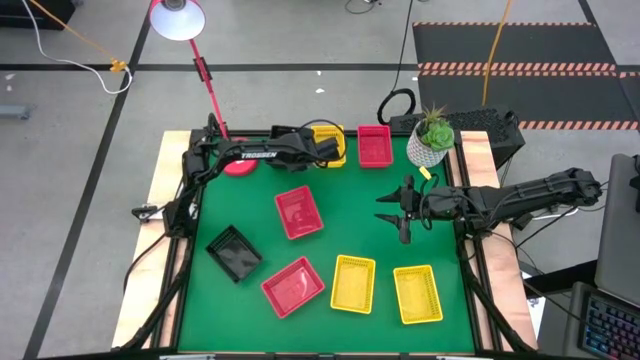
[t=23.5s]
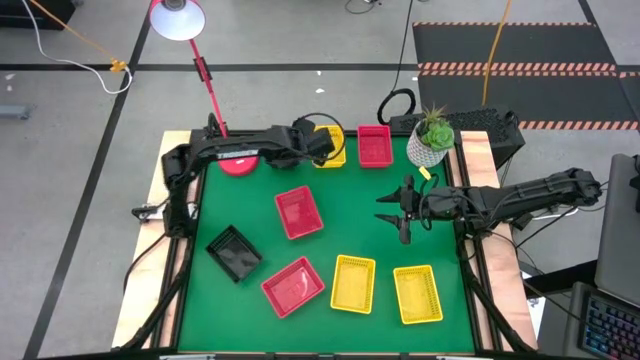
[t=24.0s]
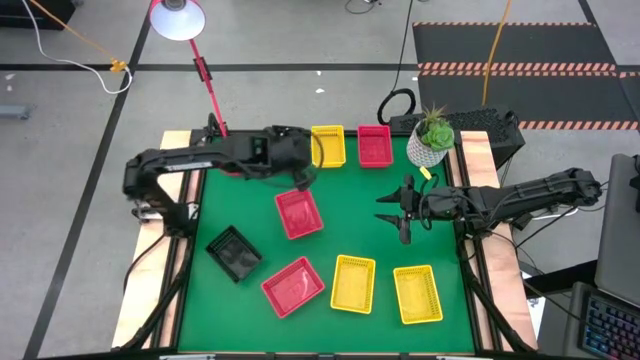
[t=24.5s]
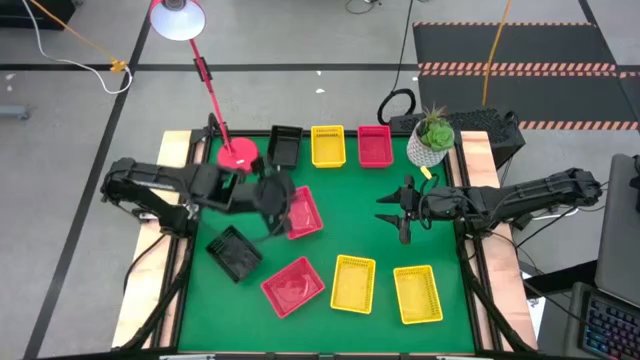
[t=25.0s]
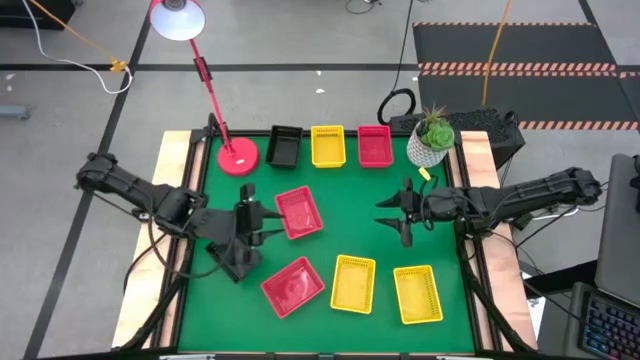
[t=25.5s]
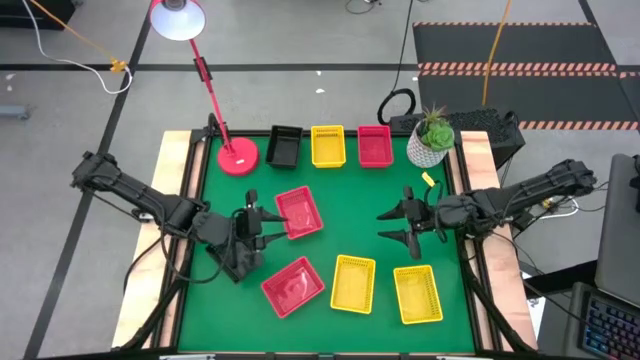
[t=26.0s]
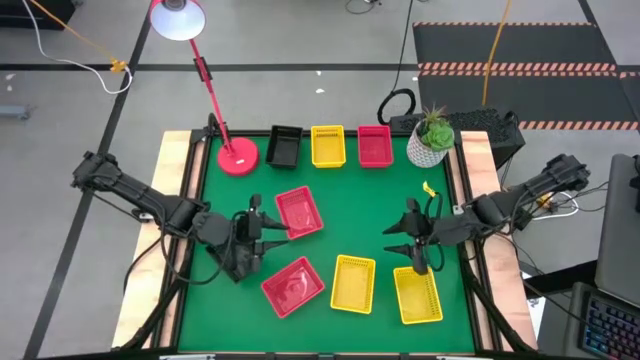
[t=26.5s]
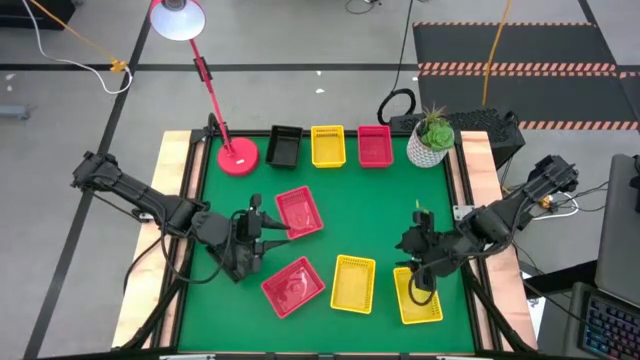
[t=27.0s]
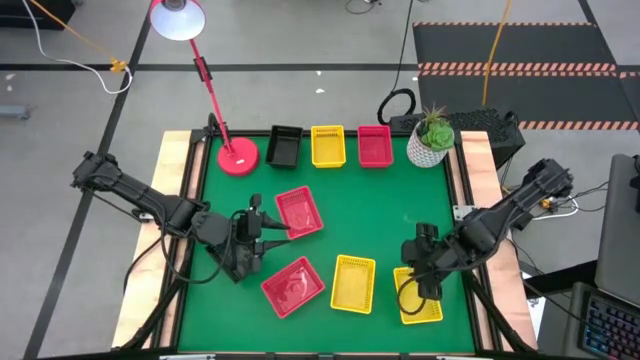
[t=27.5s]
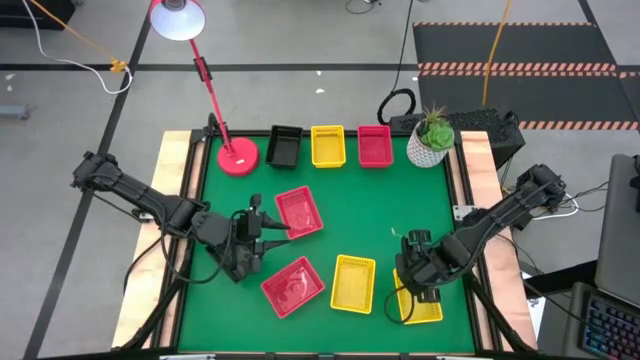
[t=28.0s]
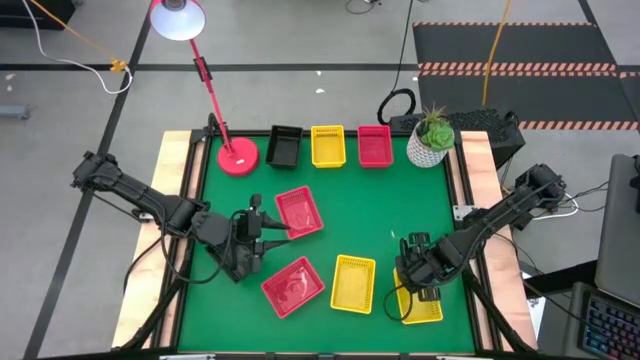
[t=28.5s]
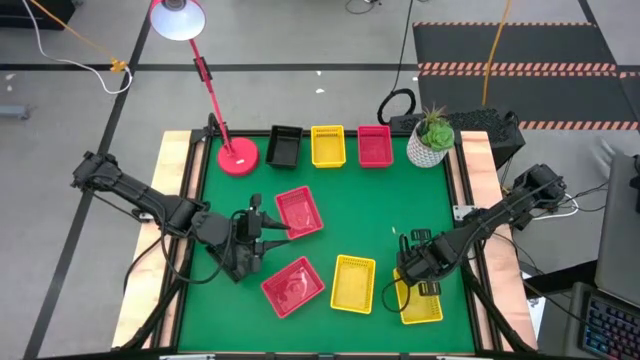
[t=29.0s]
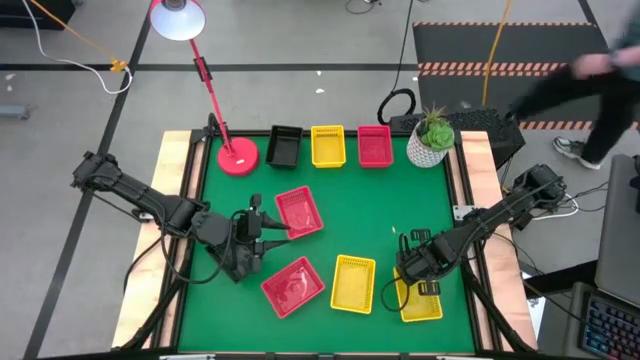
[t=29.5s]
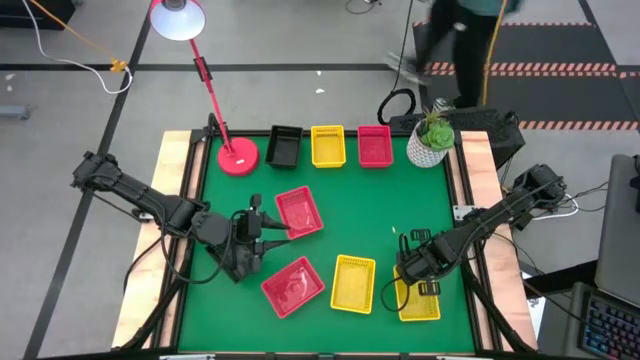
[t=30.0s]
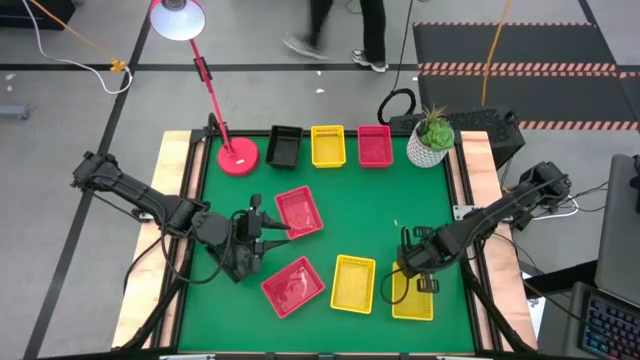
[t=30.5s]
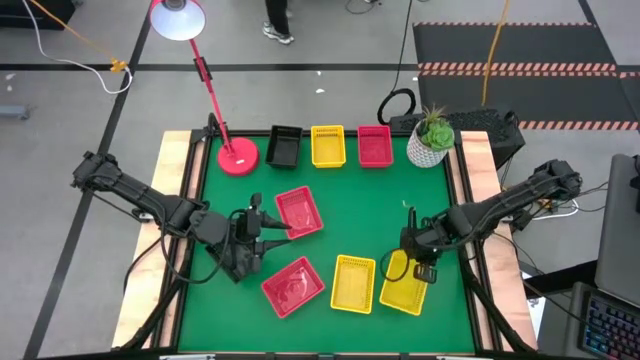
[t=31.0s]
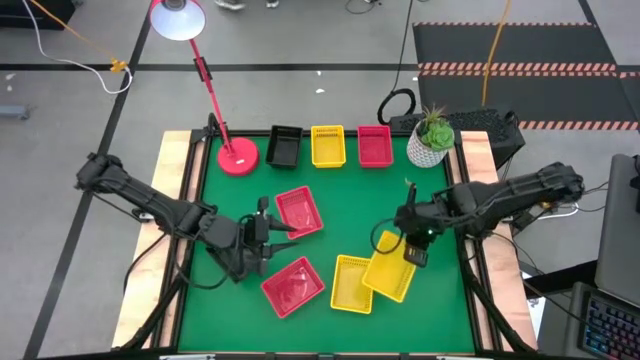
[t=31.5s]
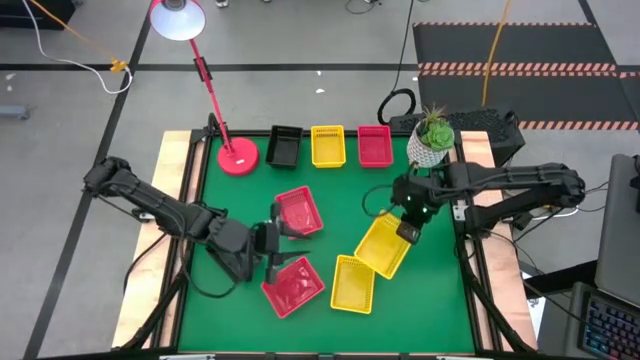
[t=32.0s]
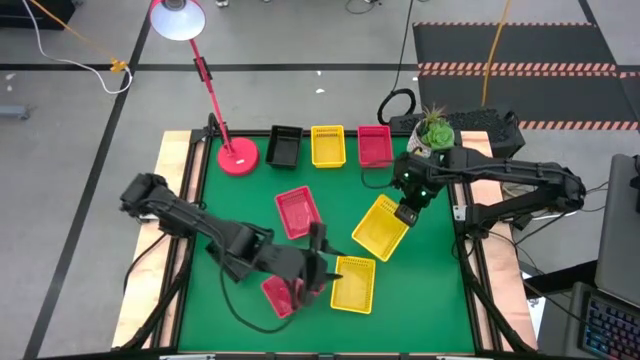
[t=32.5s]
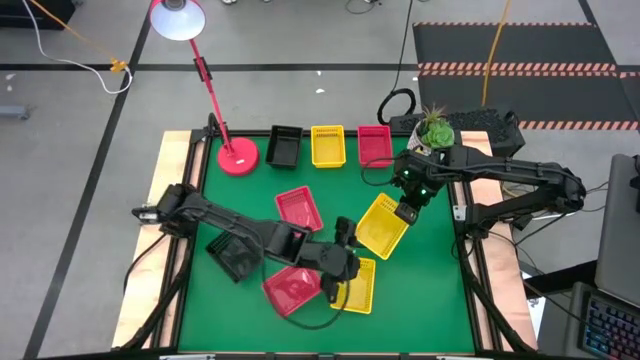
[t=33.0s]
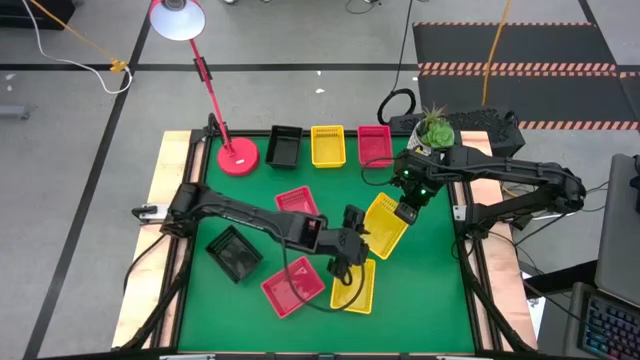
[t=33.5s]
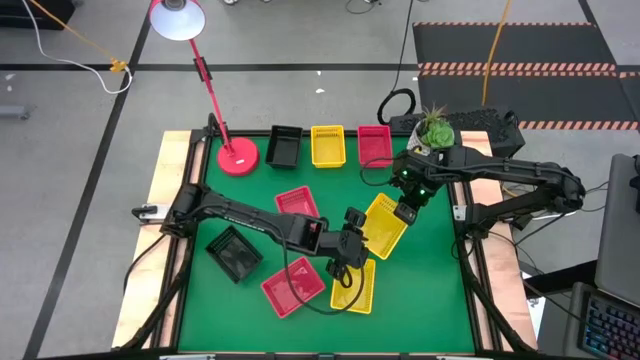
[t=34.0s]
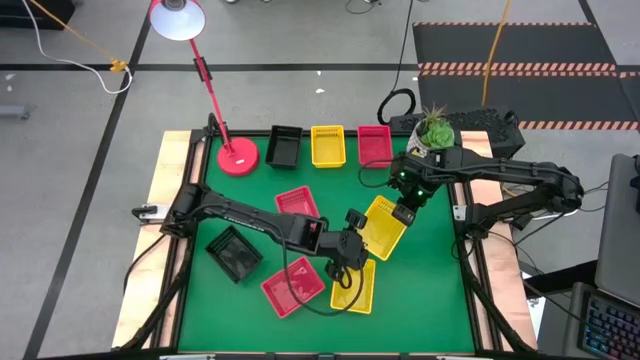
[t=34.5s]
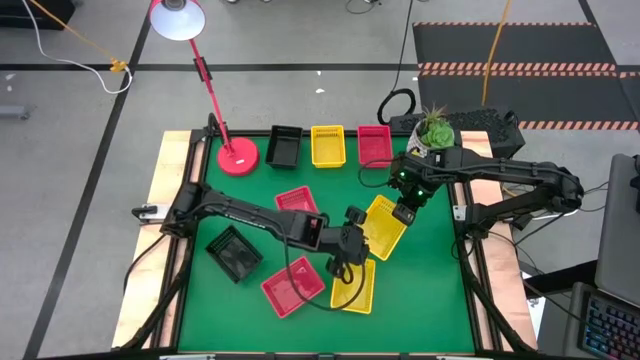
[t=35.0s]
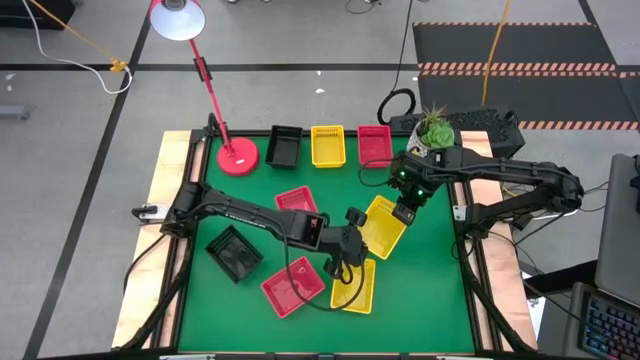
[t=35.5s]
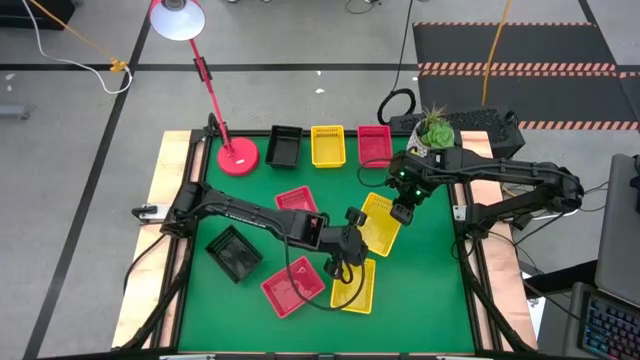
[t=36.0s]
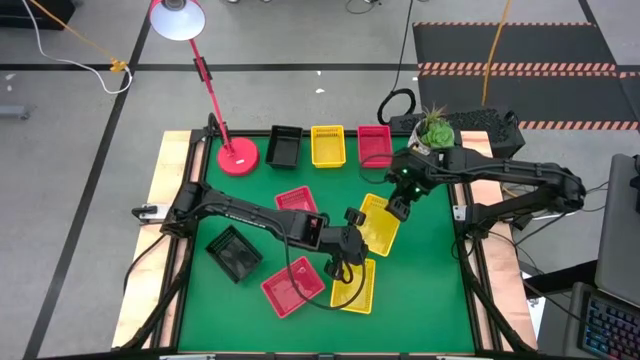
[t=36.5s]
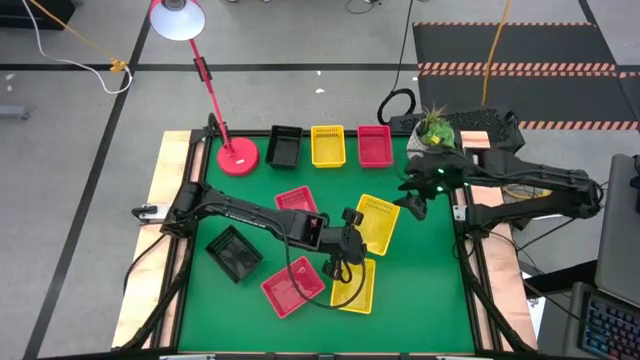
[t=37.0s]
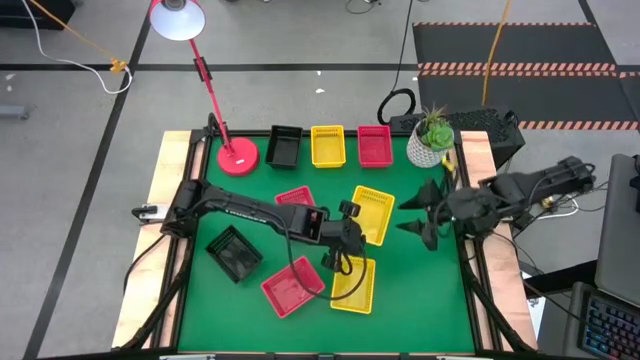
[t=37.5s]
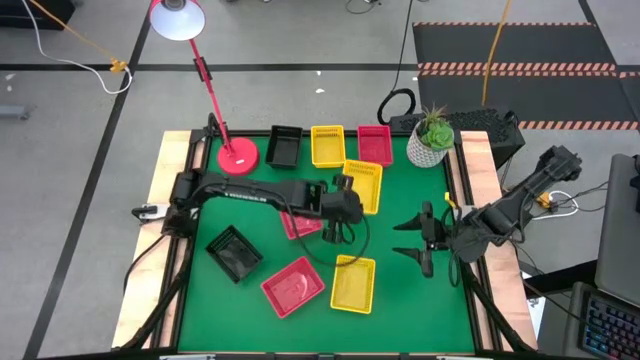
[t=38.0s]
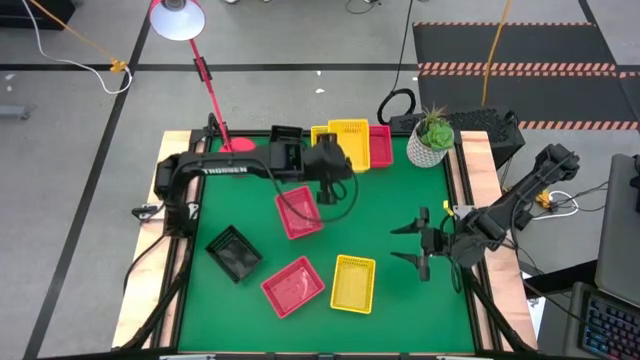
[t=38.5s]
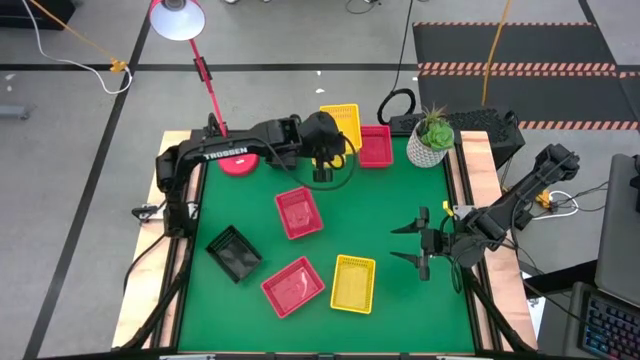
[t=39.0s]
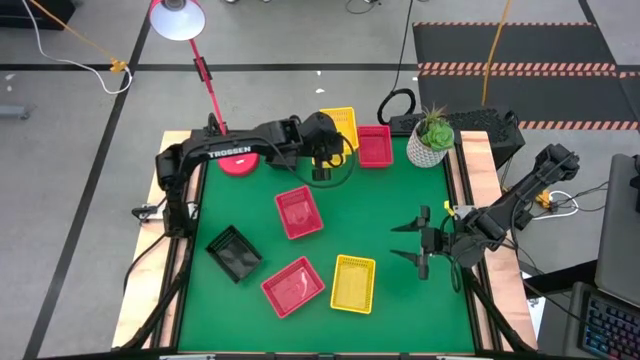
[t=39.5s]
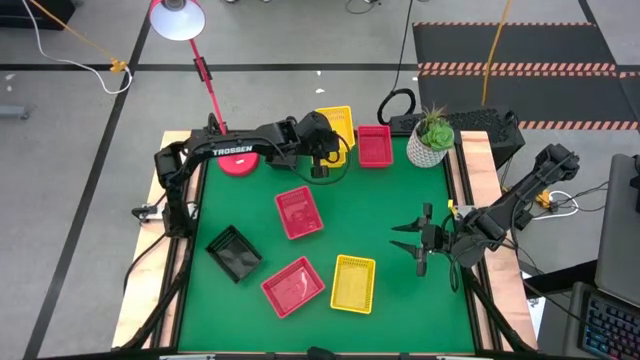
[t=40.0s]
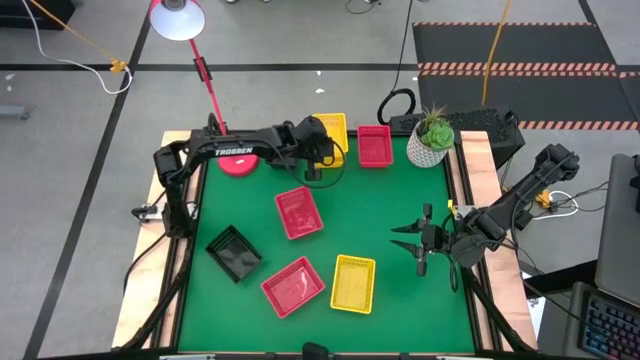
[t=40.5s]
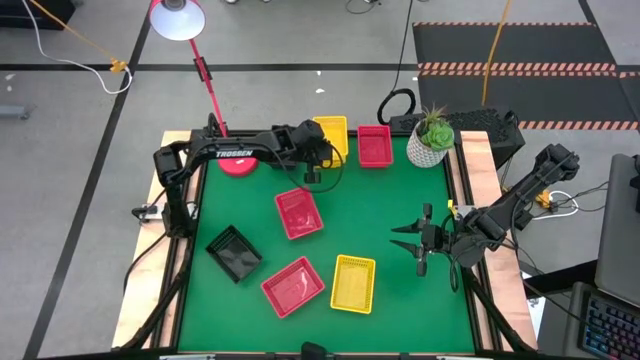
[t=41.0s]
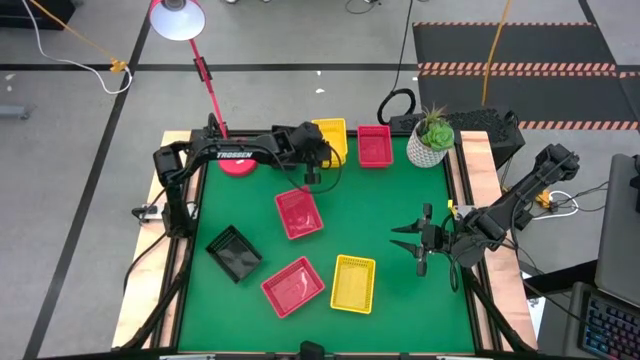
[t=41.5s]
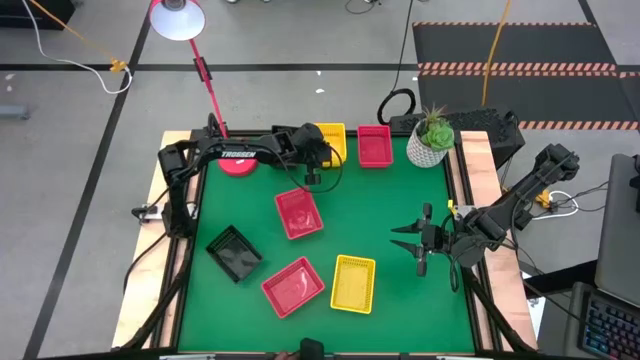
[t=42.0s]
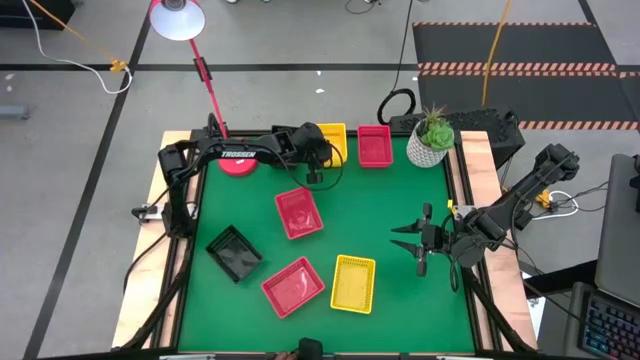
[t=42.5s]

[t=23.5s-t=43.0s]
Stack the bottom right yellow bin on the top yellow bin
